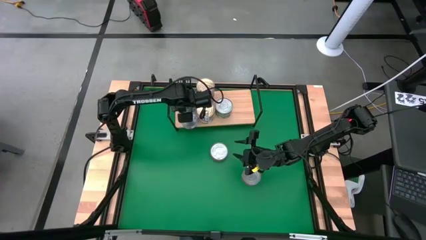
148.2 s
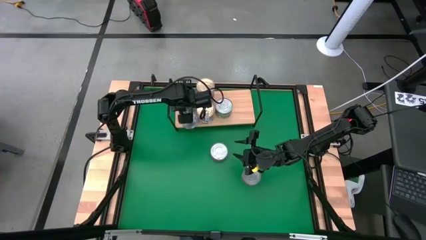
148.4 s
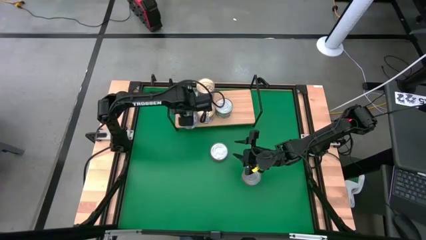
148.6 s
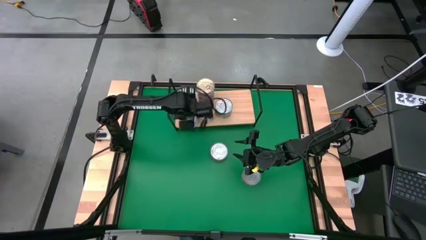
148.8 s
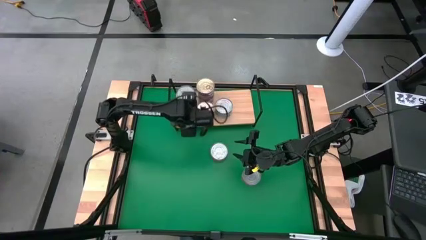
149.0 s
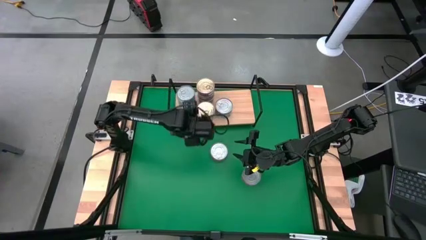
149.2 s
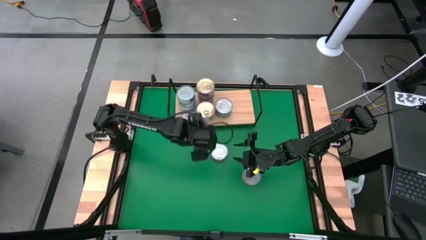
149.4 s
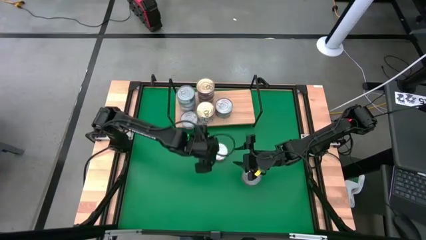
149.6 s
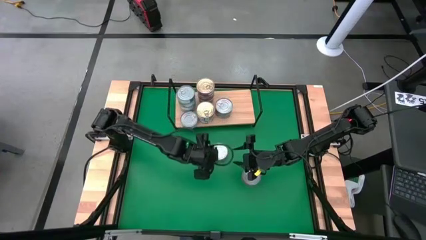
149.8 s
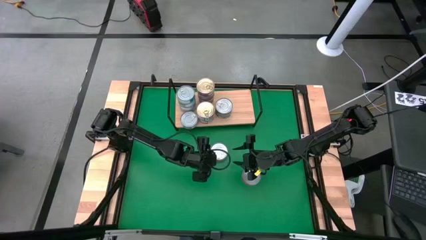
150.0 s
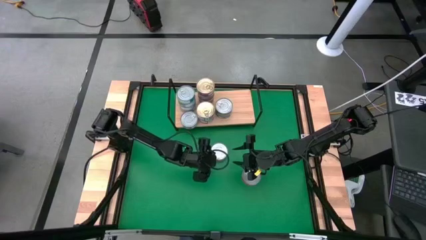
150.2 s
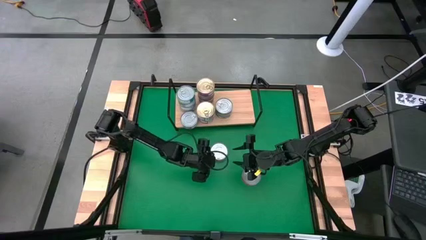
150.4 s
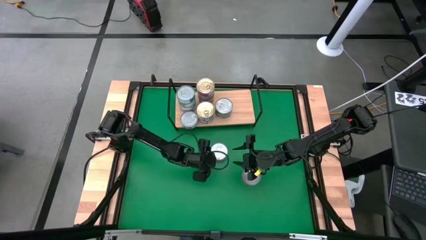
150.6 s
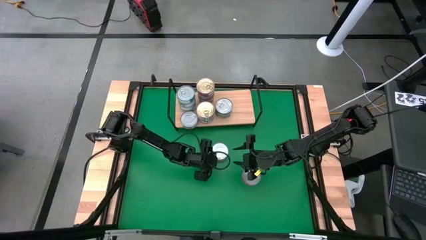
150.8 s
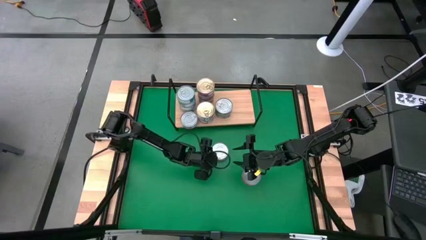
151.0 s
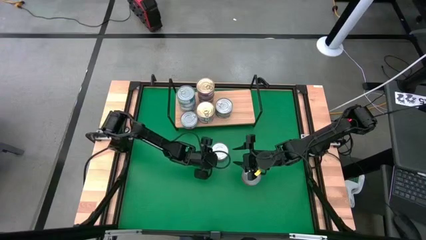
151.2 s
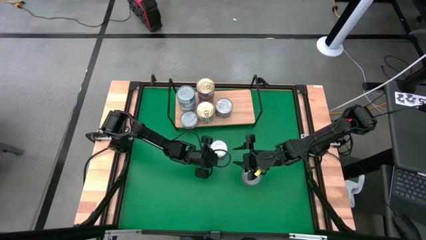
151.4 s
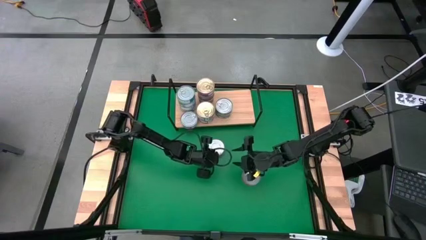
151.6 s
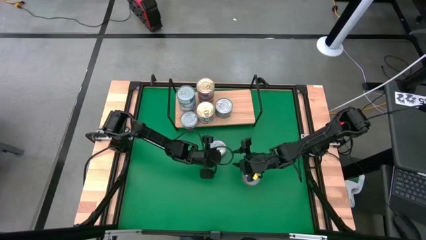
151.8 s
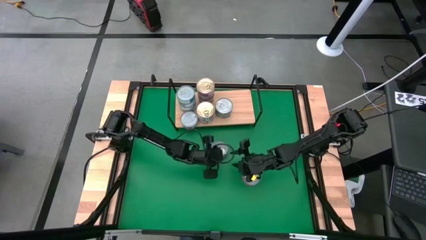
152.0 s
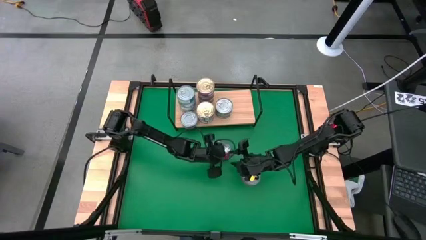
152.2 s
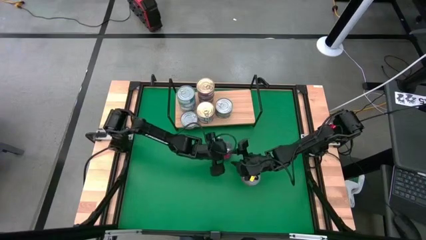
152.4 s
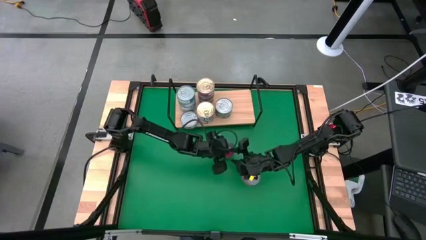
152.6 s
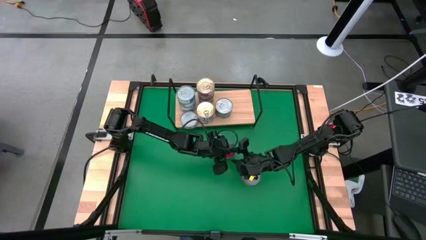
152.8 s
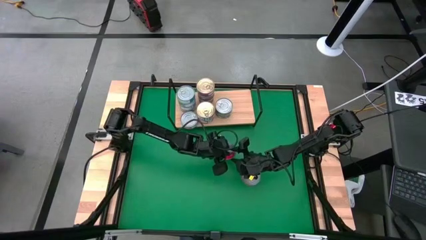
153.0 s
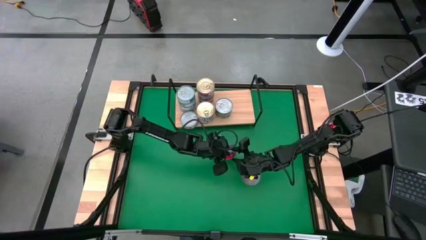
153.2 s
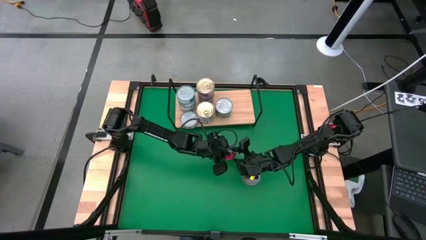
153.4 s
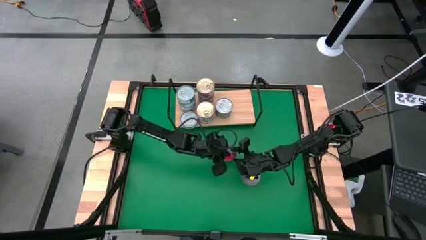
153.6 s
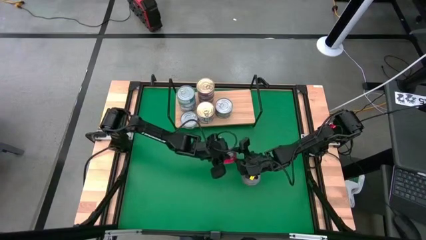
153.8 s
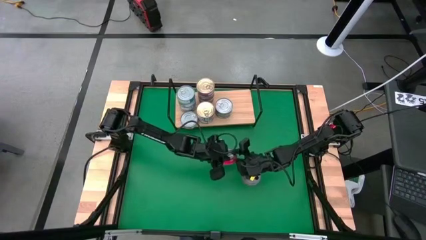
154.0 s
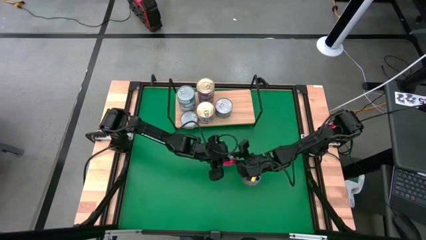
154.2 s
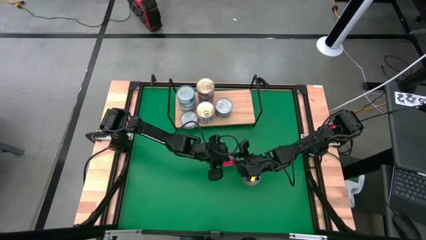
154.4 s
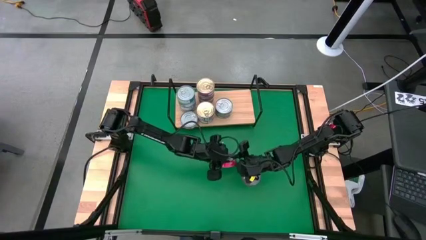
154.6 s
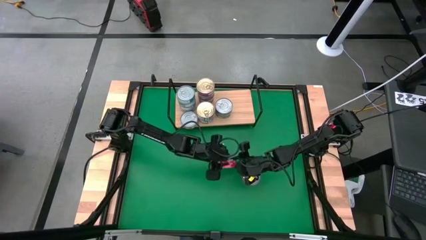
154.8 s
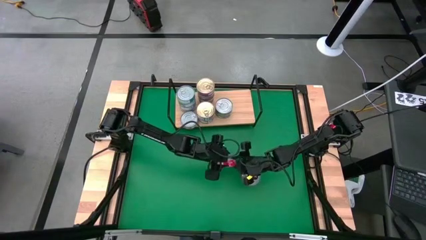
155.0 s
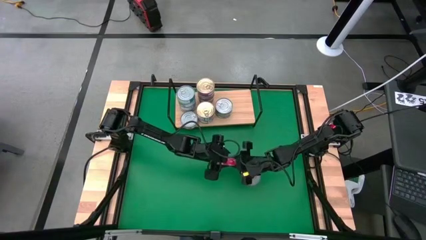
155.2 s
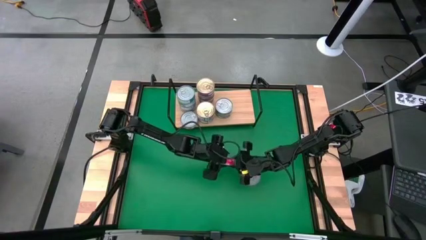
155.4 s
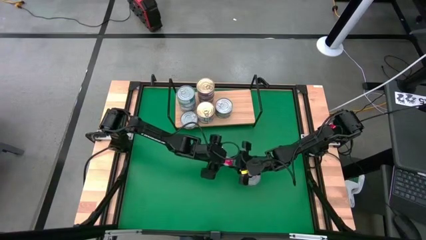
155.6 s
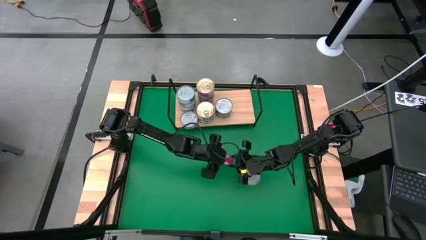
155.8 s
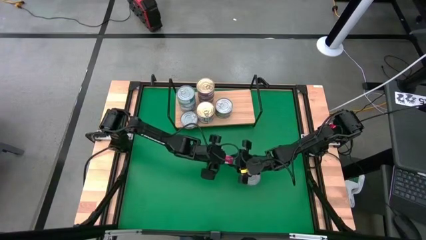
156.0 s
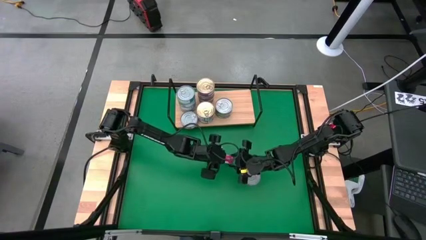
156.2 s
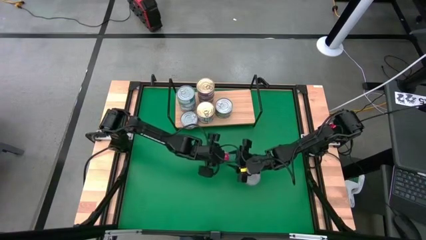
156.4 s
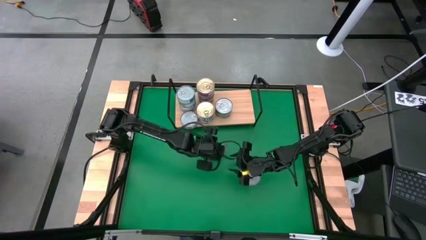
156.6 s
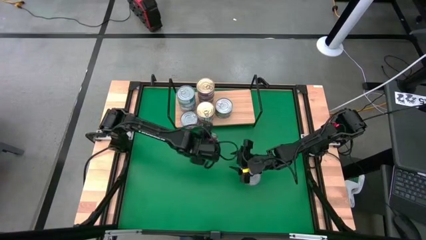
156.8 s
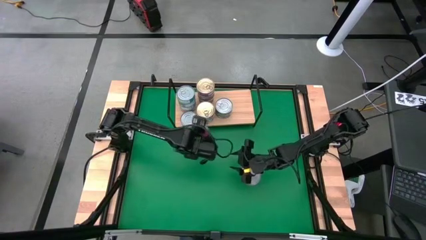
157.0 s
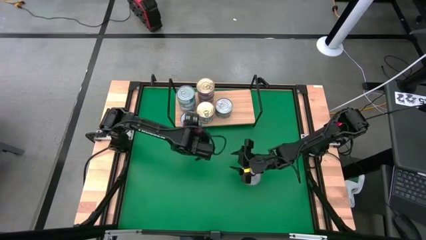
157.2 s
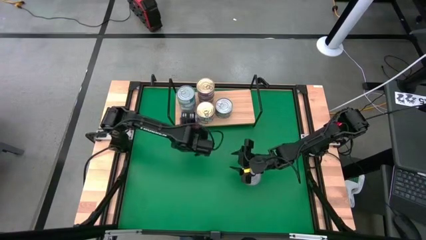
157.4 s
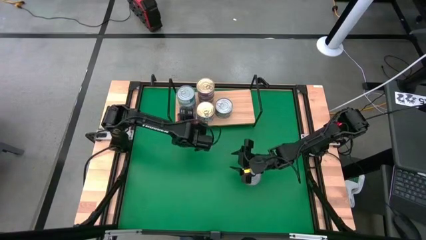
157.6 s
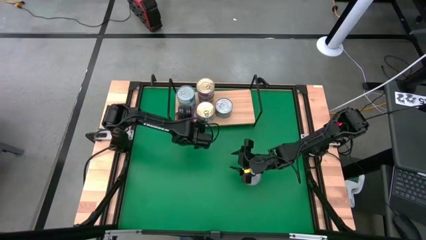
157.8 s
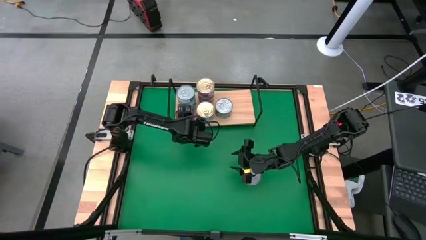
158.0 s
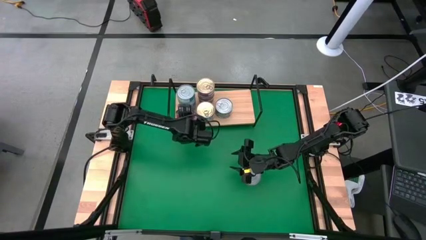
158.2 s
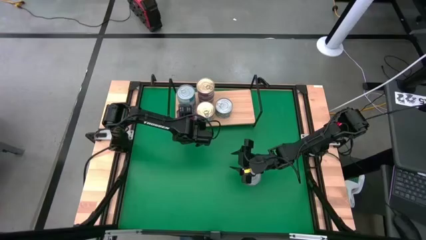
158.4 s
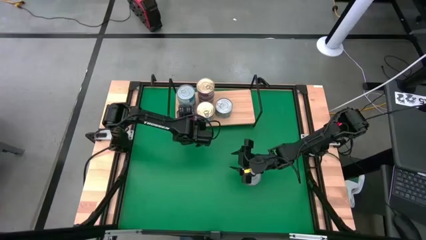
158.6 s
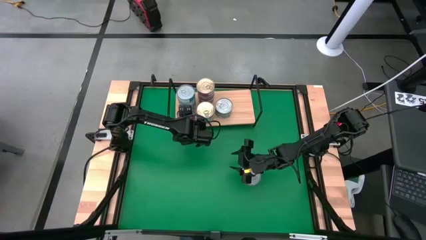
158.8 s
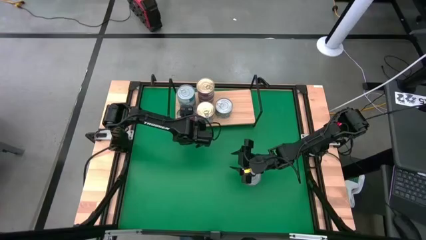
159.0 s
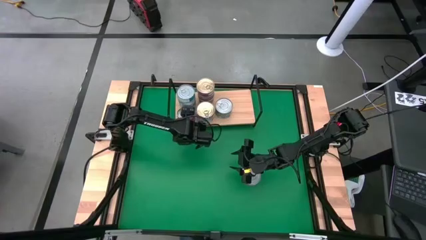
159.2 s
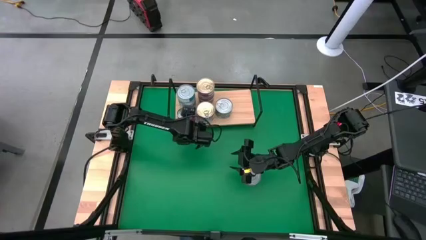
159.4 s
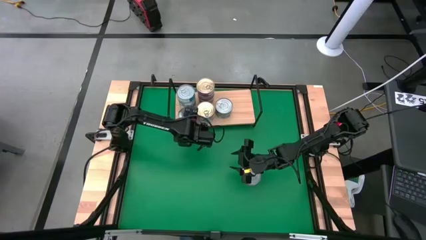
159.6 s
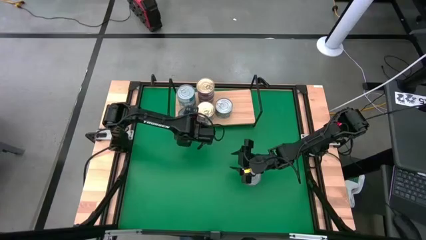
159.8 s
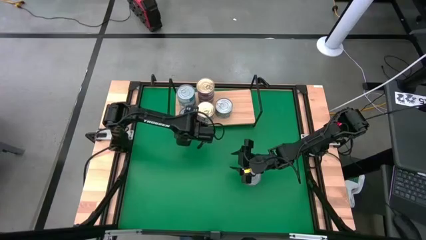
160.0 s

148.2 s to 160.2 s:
Task: Stack canned seafood by type on shelf
Stack the red tuna can on top of the red tuna can on the shelf

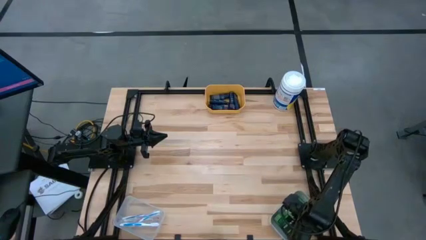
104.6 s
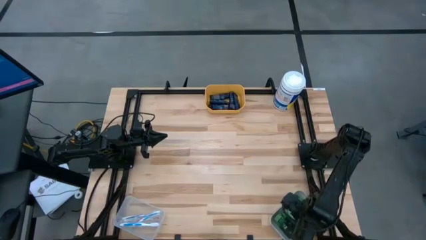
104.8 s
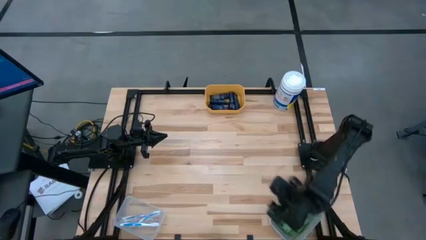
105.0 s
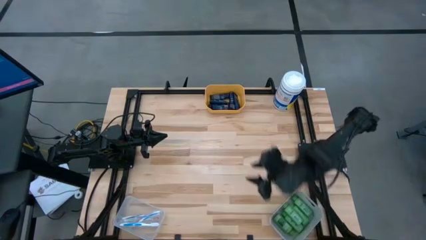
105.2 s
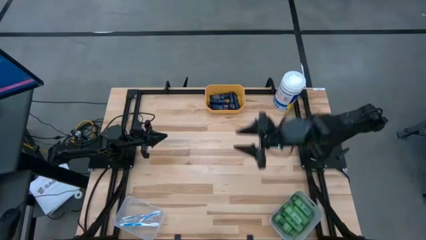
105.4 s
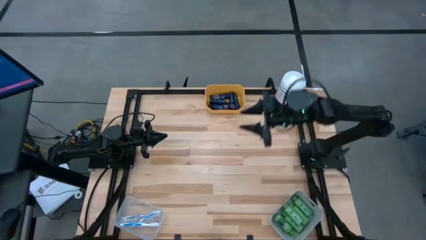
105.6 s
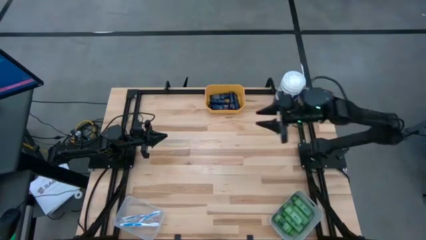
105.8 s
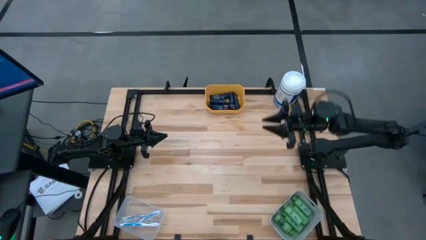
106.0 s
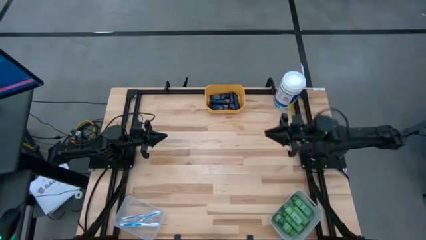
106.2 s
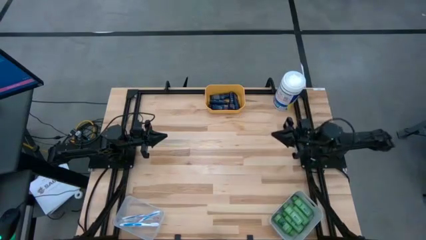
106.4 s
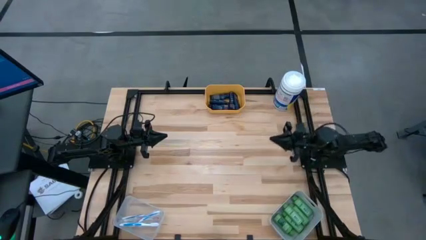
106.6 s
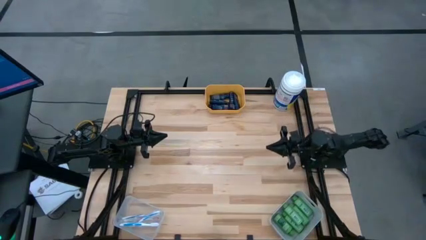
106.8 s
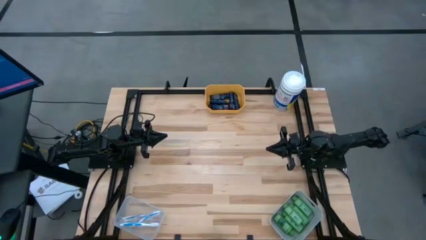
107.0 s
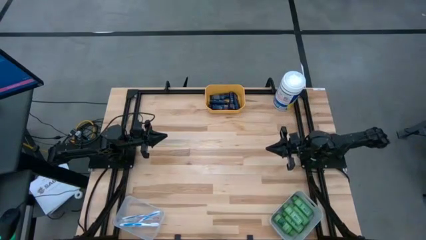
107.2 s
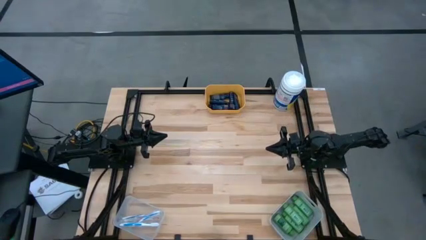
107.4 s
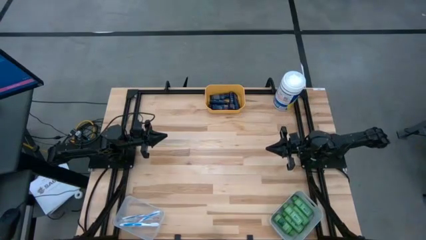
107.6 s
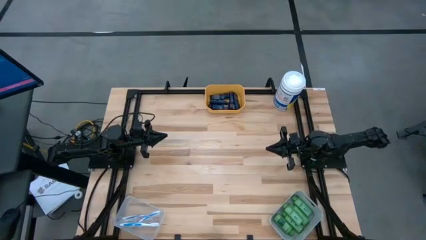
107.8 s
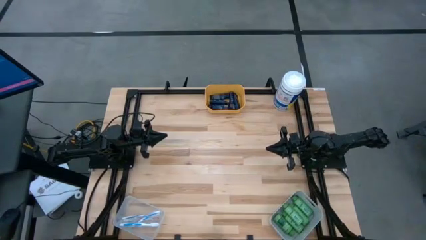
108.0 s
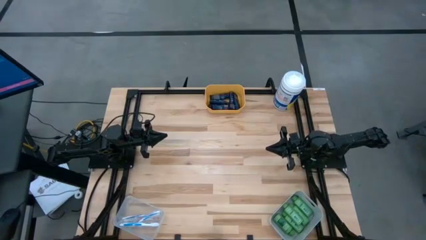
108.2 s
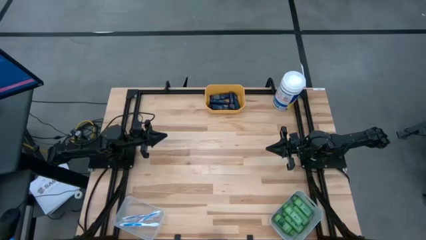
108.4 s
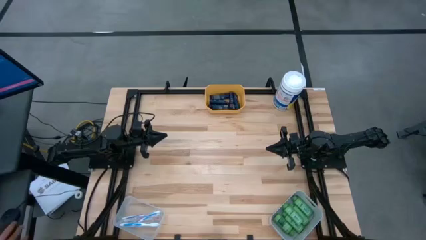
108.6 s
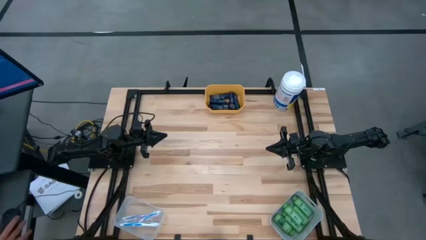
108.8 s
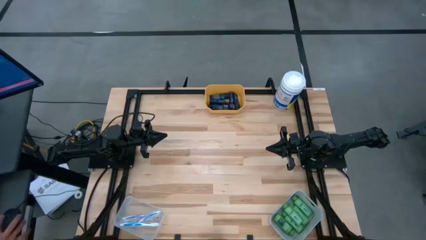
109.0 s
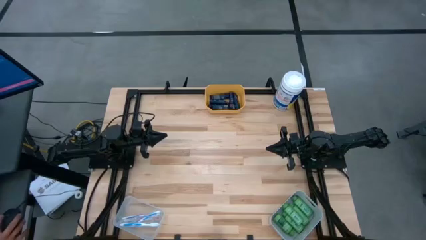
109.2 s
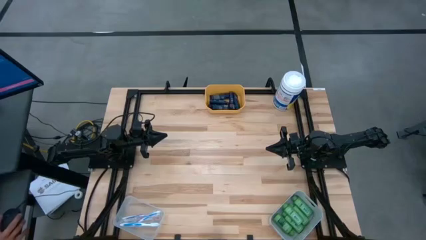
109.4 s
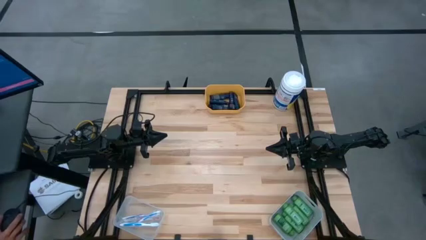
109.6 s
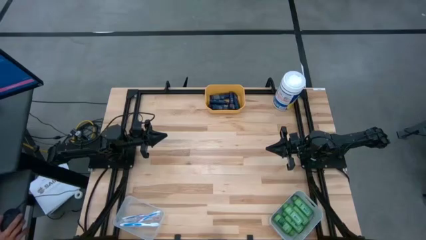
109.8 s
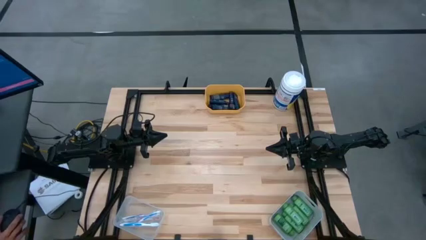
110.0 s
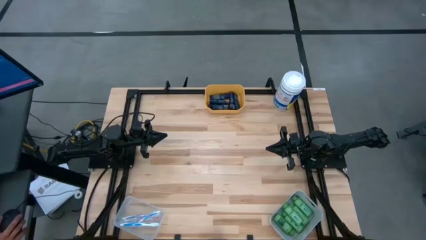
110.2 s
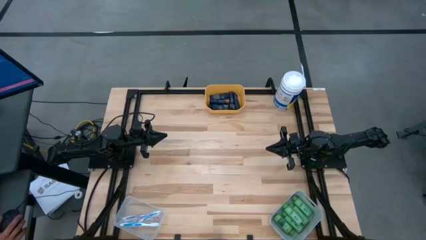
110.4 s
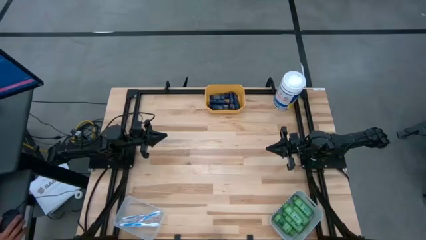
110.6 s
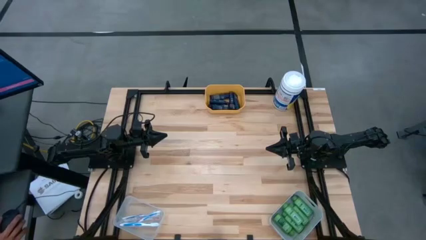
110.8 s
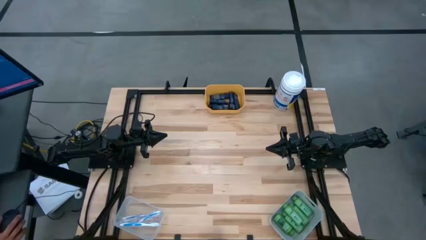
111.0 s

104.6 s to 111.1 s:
Task: Pick & Place Travel size toiletries
Return to Home Position
